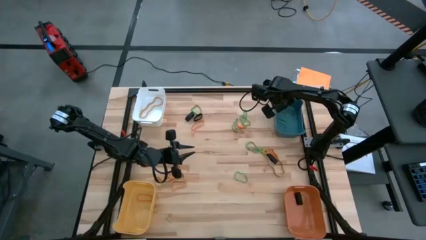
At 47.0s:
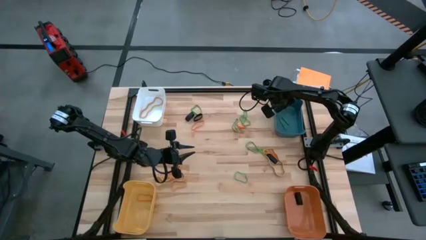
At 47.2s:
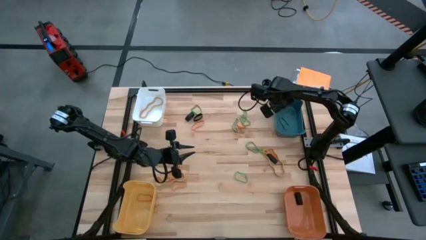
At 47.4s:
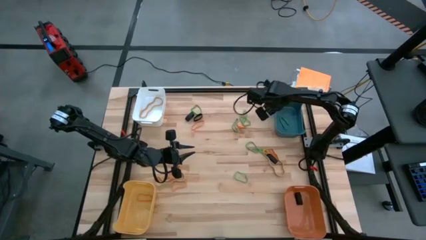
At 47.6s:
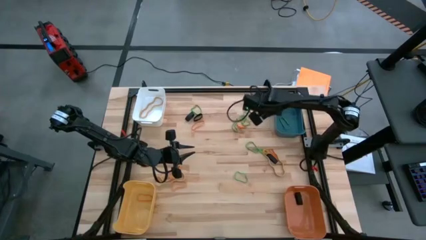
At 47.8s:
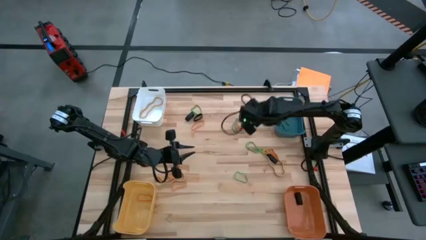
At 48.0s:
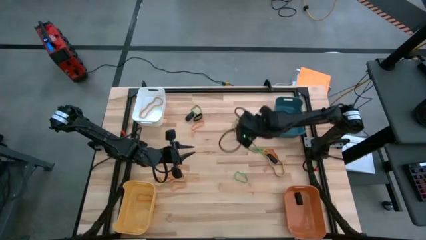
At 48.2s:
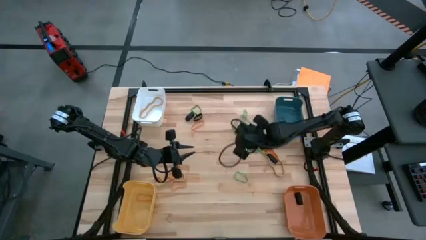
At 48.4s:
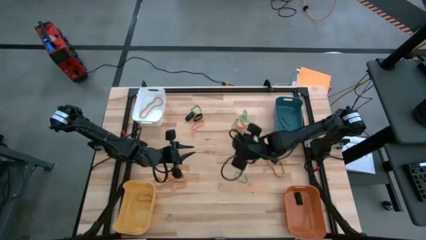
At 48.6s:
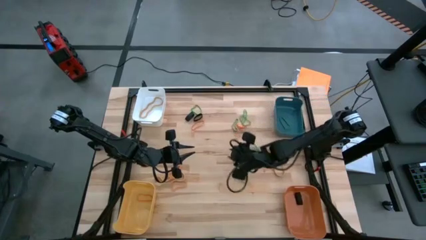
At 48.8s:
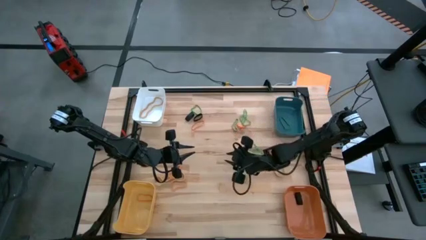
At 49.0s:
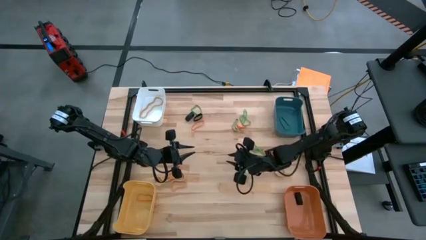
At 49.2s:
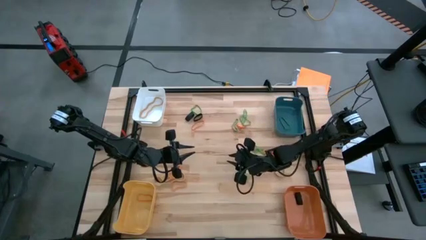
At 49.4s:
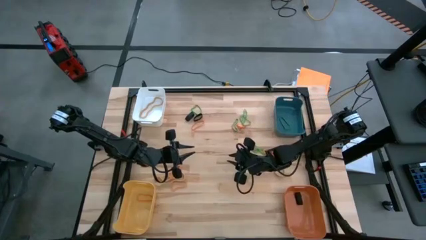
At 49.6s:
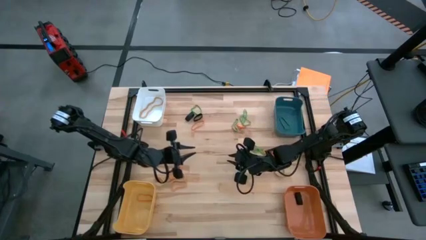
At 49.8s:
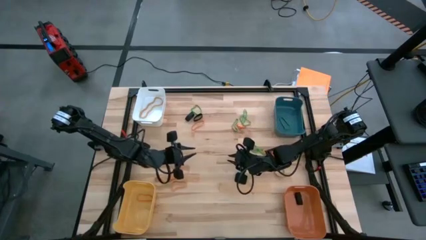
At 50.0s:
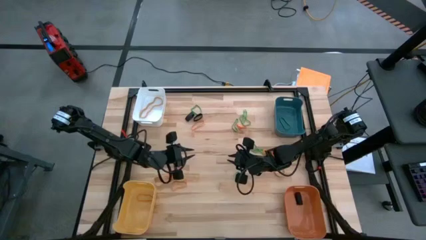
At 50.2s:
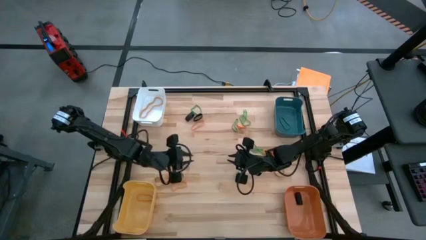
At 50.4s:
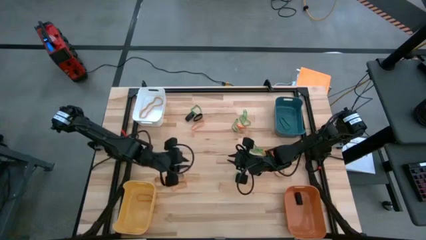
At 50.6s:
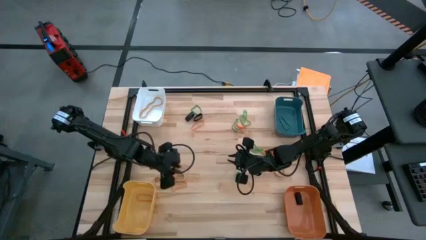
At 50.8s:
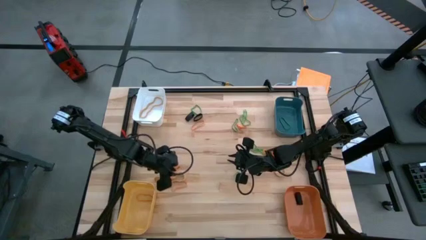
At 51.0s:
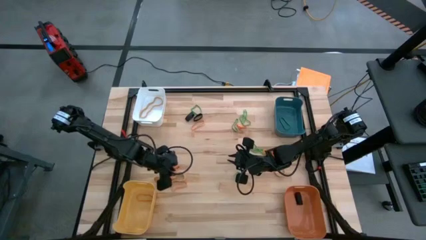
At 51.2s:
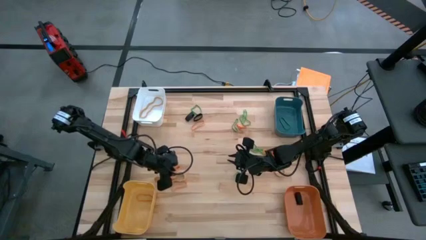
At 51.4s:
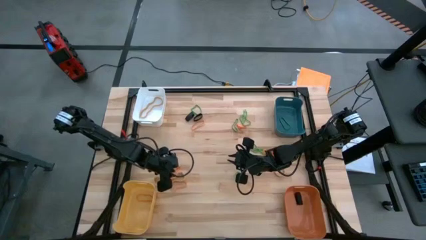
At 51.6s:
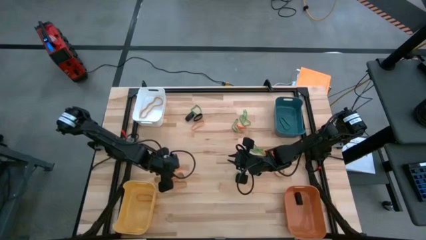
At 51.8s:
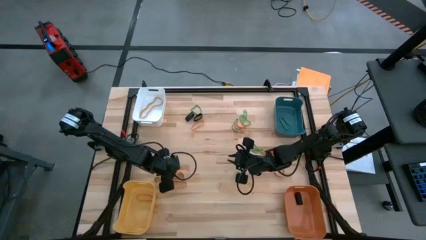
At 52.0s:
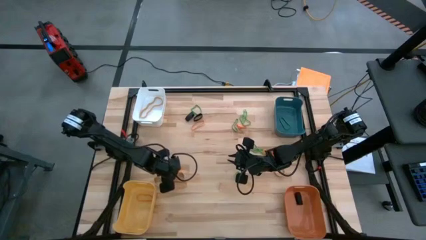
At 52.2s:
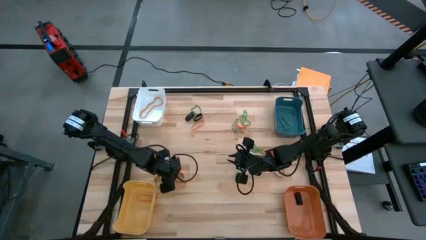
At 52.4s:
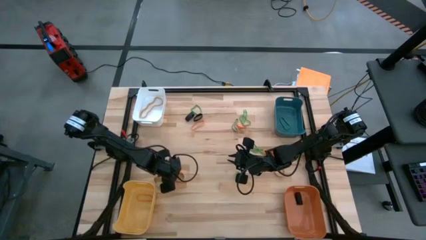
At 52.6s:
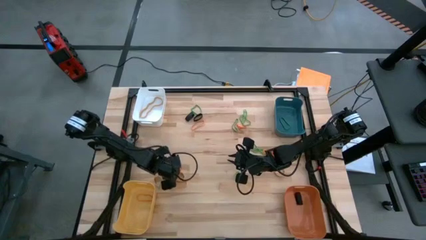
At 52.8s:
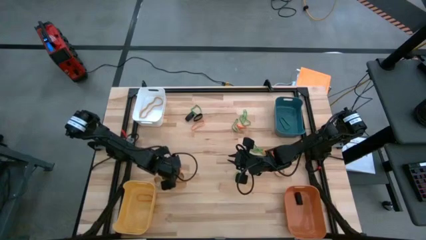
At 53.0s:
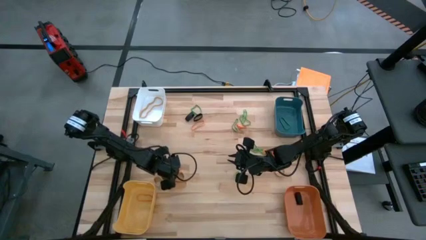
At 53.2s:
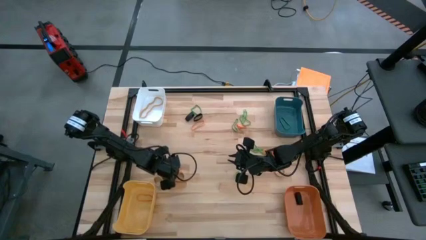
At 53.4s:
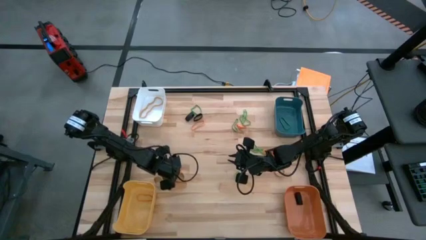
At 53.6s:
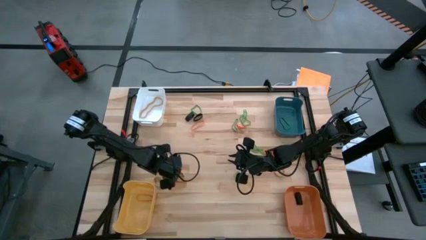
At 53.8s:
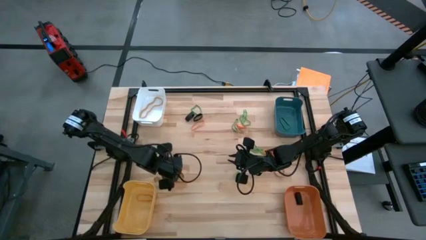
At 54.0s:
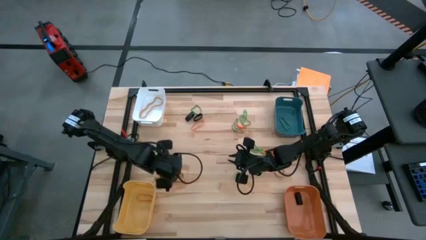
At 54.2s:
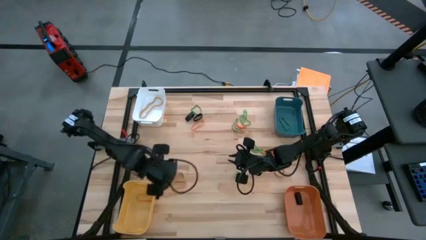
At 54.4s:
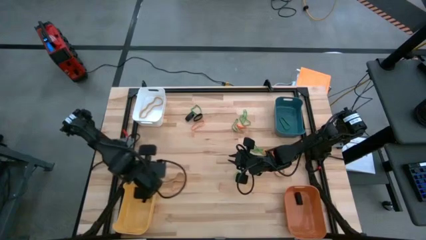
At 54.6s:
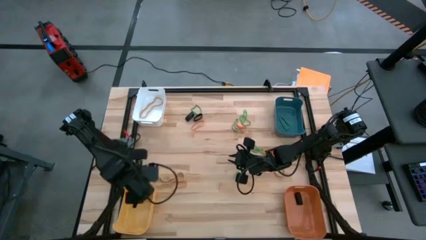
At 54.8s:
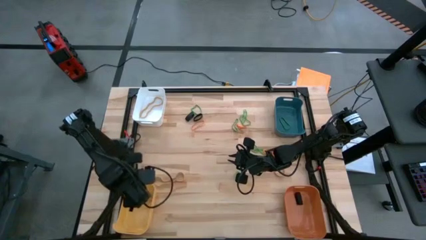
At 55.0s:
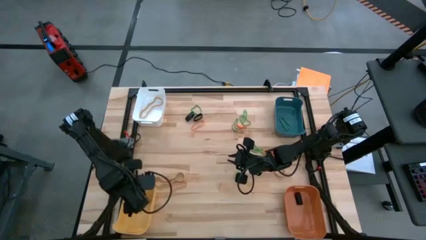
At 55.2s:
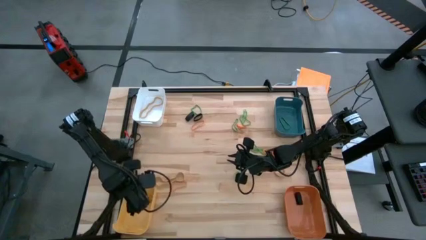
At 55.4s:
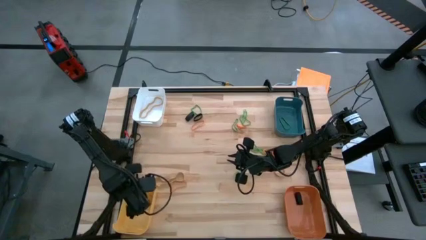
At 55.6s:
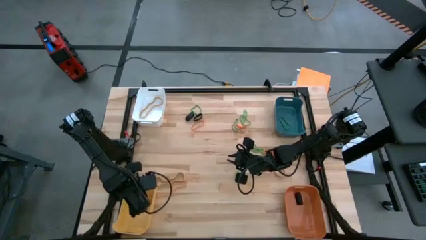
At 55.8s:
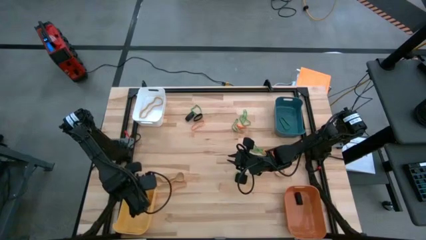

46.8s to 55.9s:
Task: Sort rubber bands into baskets
Put the orange rubber band into the yellow bin

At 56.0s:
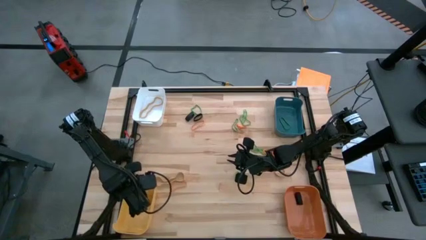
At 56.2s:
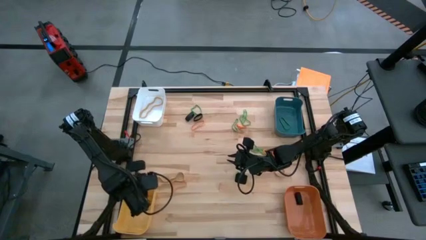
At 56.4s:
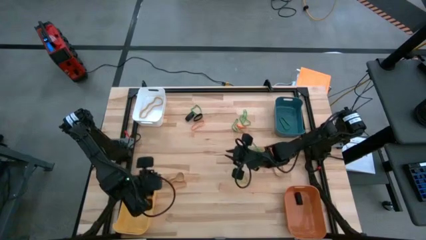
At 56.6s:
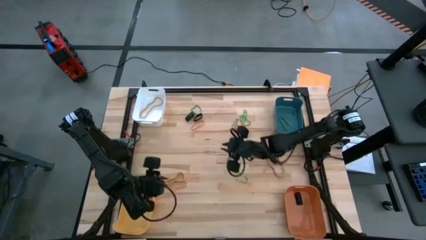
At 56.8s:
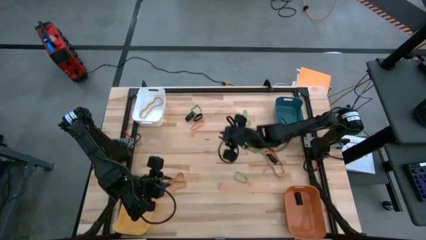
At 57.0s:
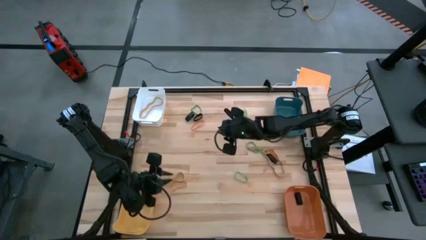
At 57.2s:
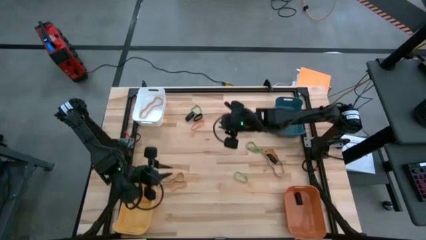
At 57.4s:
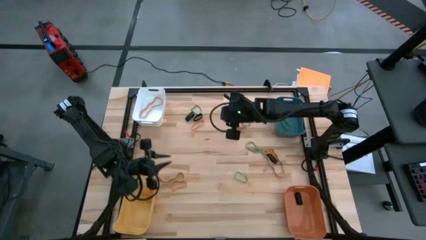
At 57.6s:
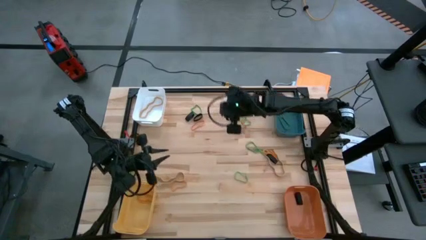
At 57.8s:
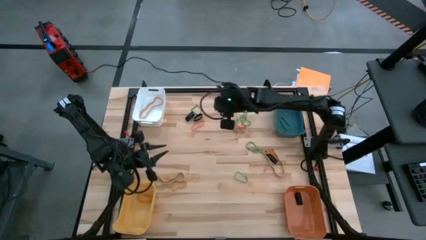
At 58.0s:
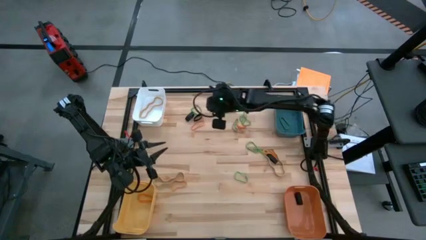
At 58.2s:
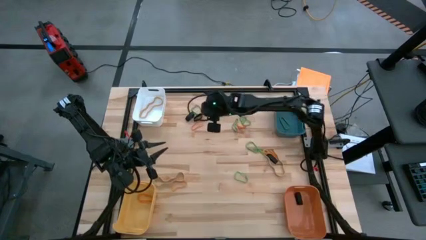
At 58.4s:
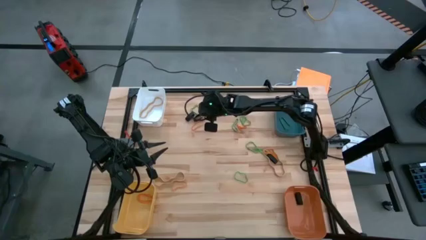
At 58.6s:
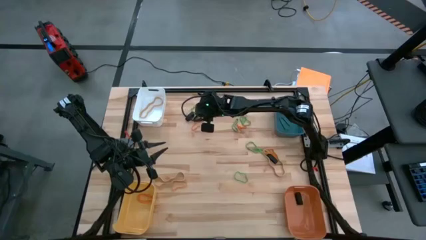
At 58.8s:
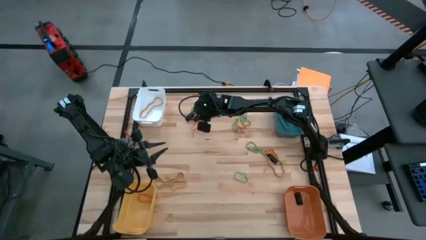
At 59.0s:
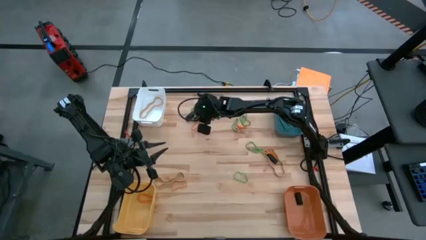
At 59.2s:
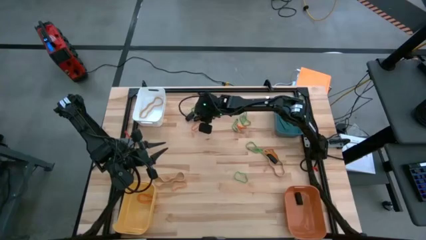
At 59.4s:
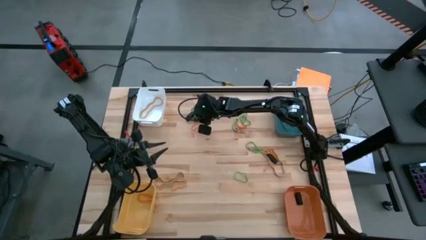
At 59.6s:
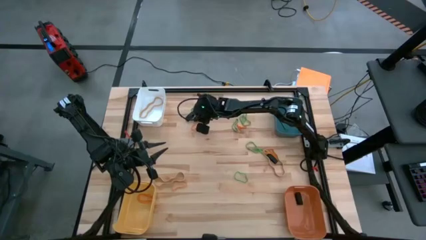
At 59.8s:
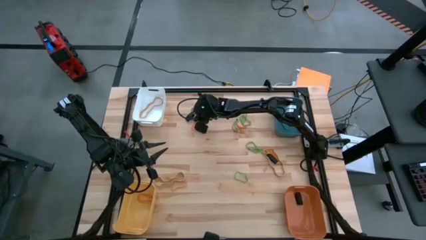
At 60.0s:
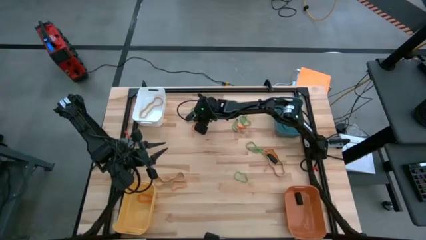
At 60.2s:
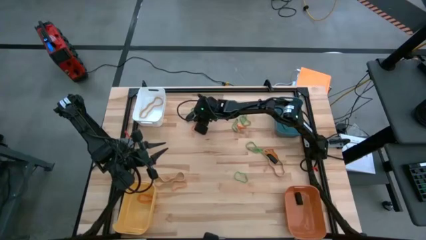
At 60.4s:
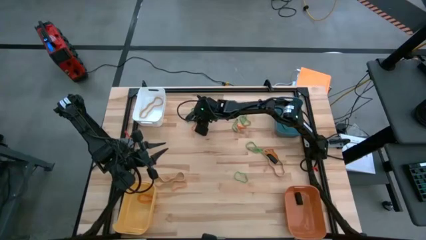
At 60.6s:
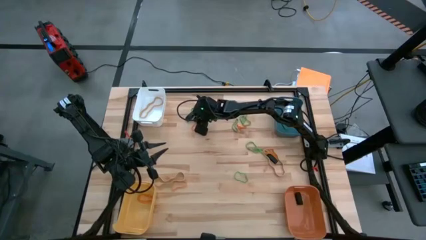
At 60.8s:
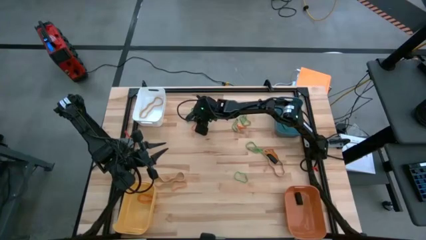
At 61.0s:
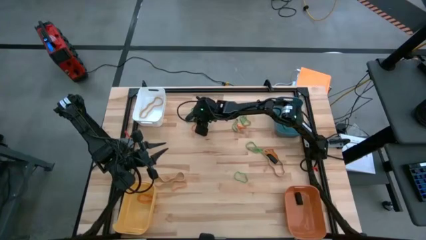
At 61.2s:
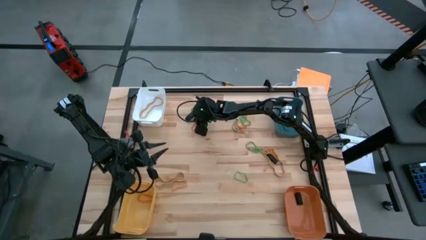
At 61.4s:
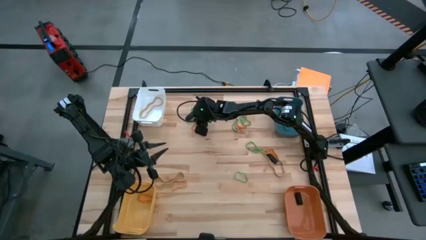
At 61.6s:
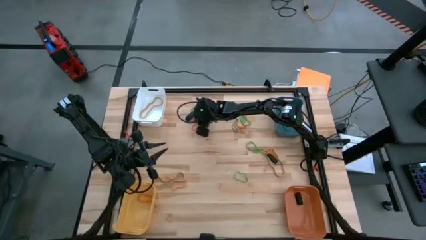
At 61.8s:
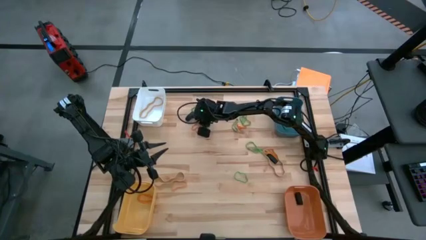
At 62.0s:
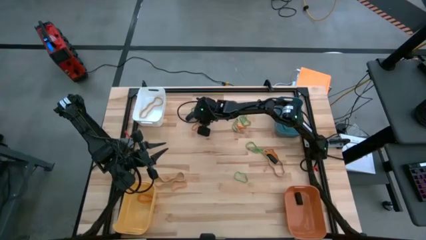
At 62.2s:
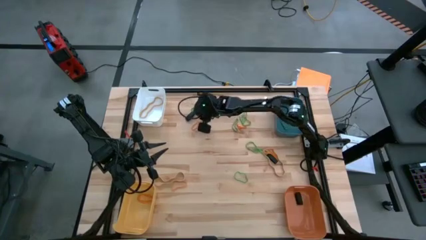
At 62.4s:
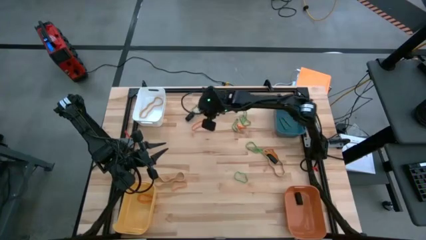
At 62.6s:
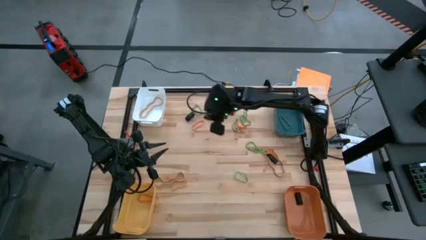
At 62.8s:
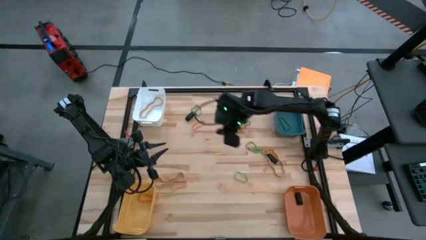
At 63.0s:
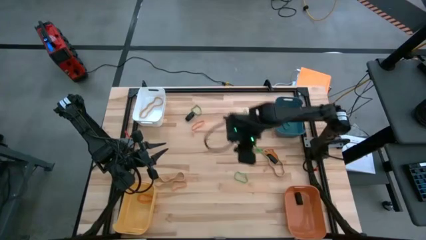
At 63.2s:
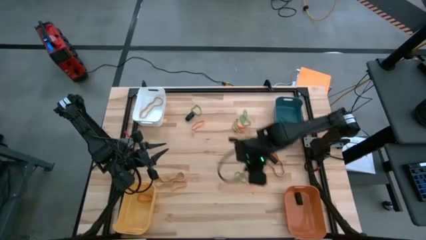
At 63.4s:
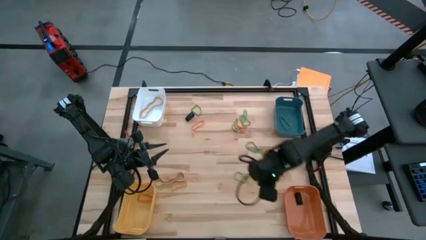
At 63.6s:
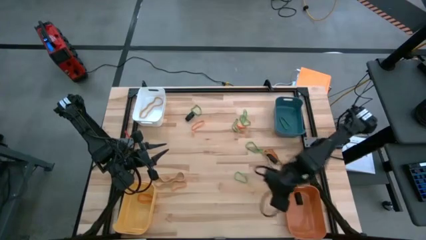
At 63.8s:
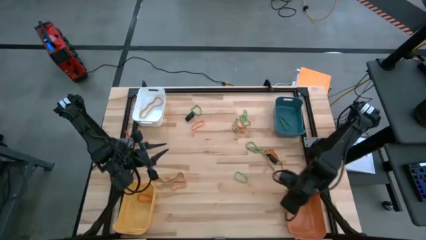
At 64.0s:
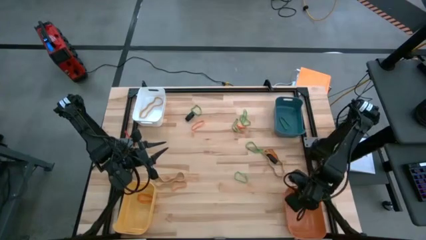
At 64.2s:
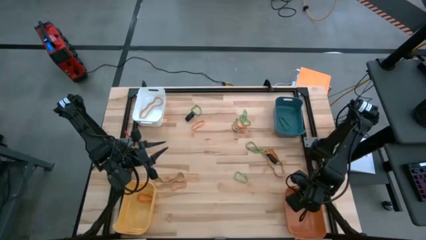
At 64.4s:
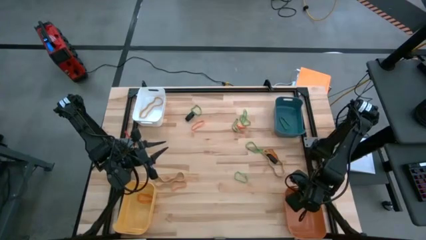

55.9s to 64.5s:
Put the black rubber band into the orange bin
